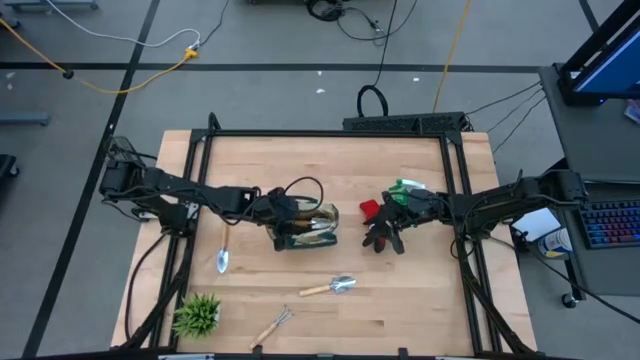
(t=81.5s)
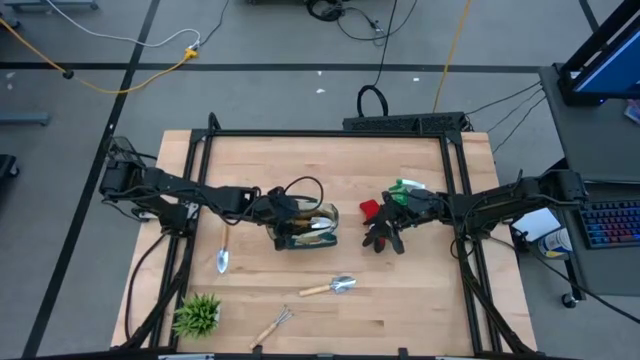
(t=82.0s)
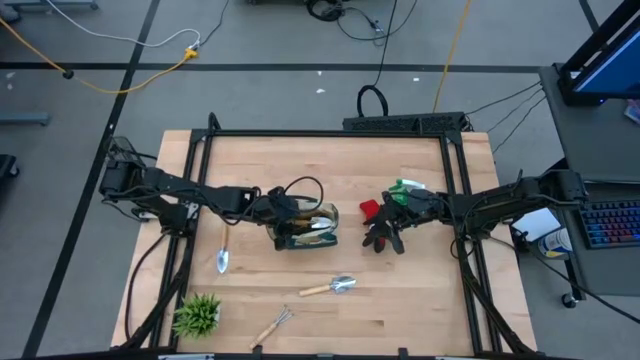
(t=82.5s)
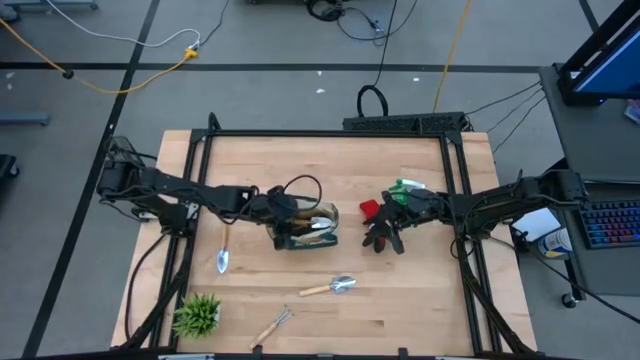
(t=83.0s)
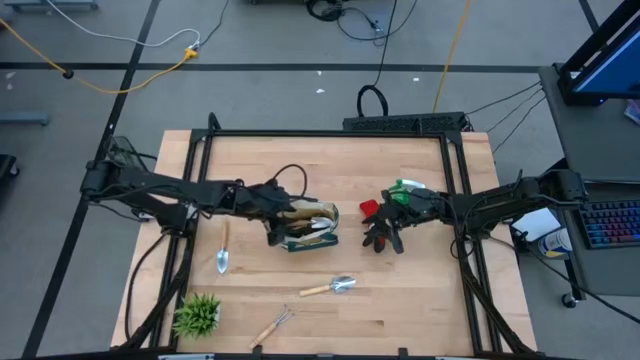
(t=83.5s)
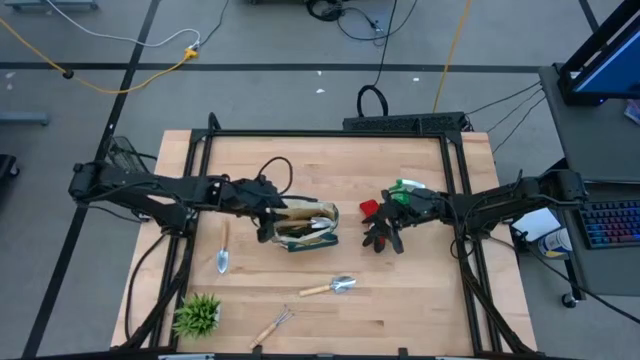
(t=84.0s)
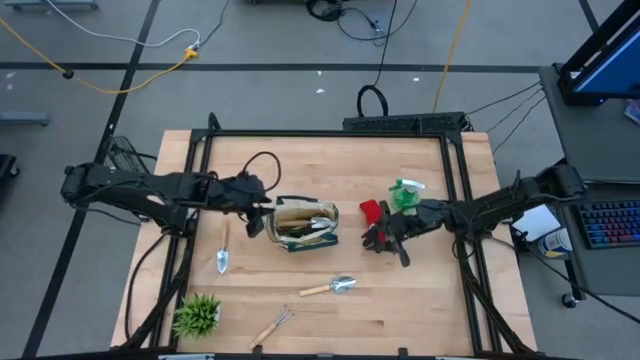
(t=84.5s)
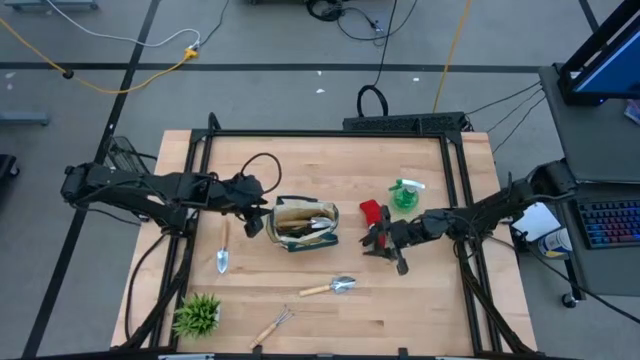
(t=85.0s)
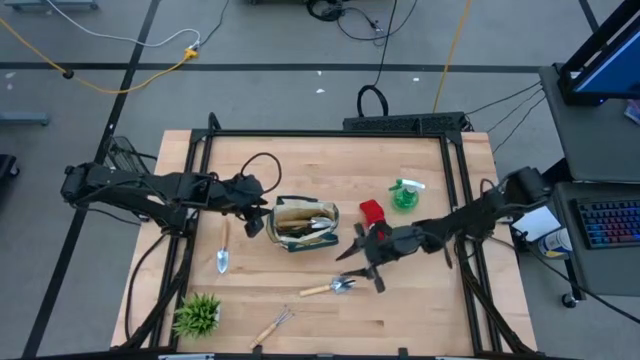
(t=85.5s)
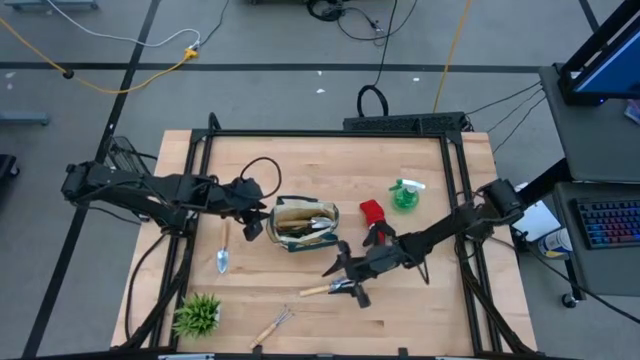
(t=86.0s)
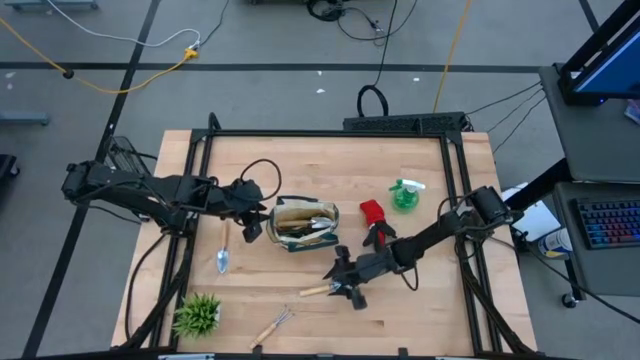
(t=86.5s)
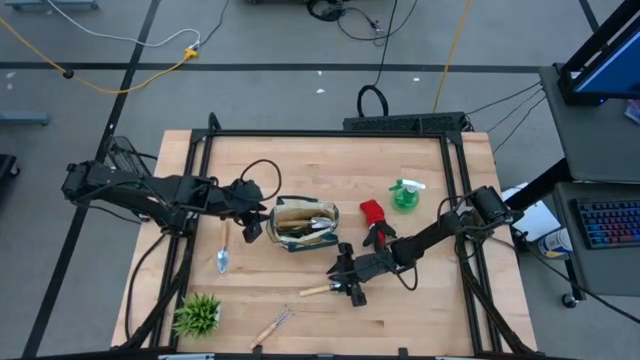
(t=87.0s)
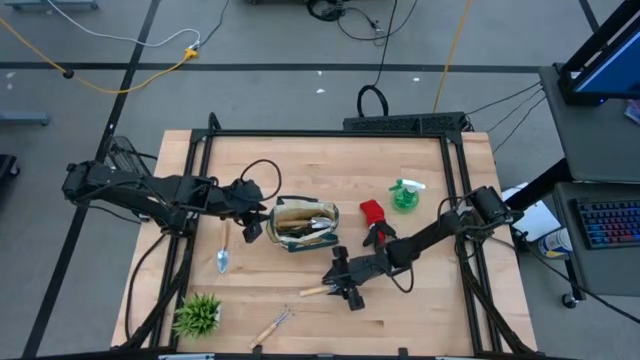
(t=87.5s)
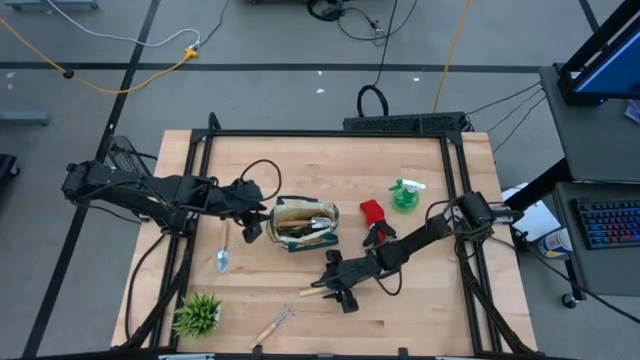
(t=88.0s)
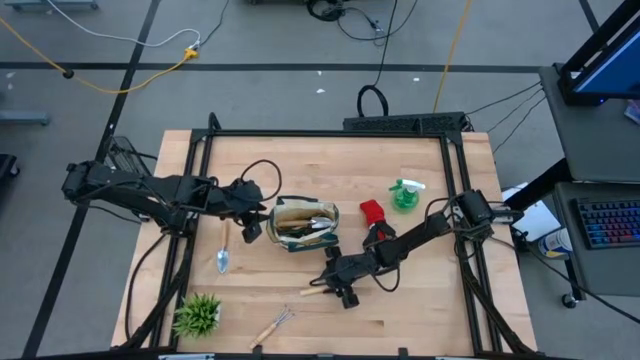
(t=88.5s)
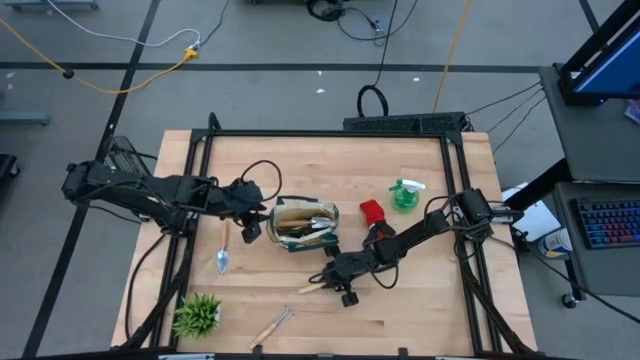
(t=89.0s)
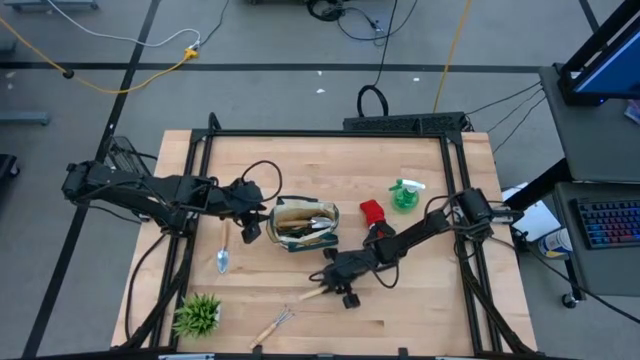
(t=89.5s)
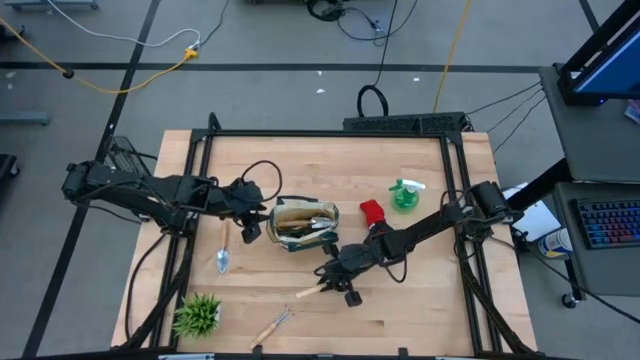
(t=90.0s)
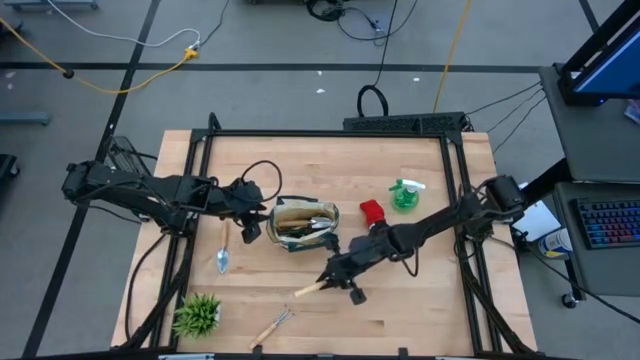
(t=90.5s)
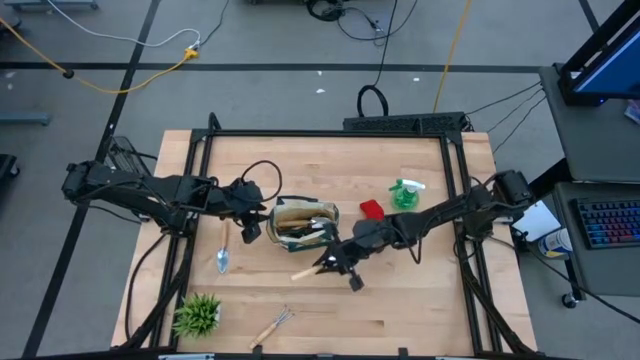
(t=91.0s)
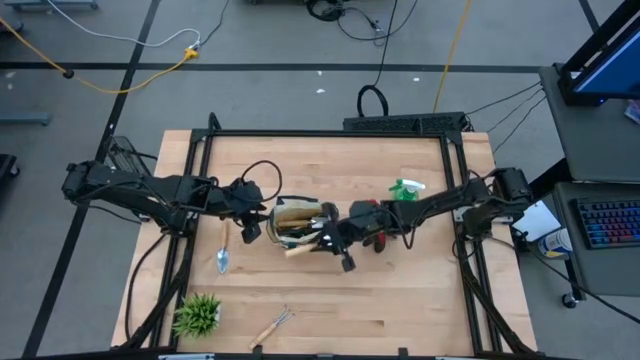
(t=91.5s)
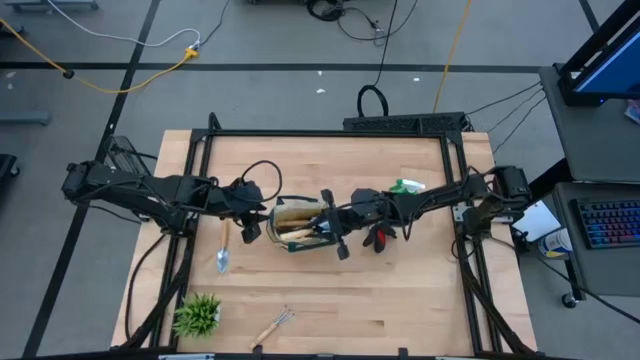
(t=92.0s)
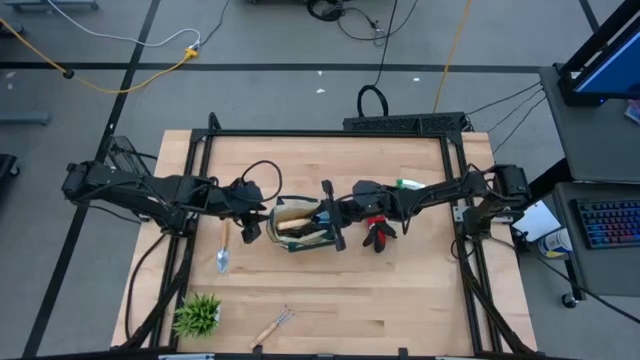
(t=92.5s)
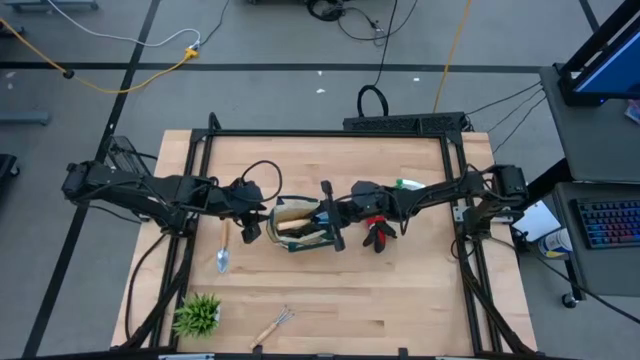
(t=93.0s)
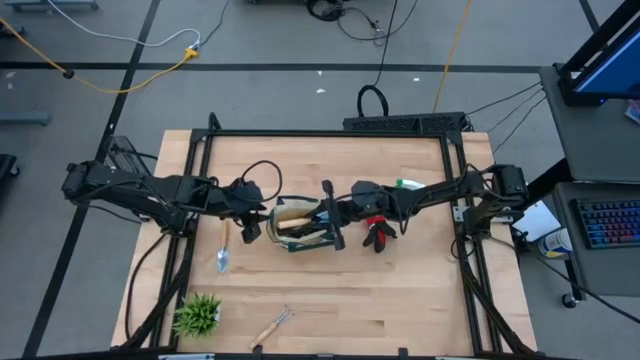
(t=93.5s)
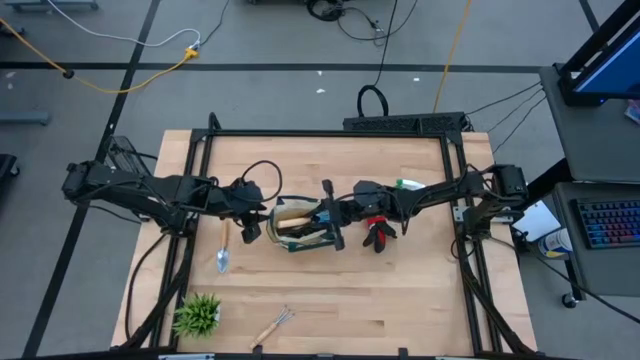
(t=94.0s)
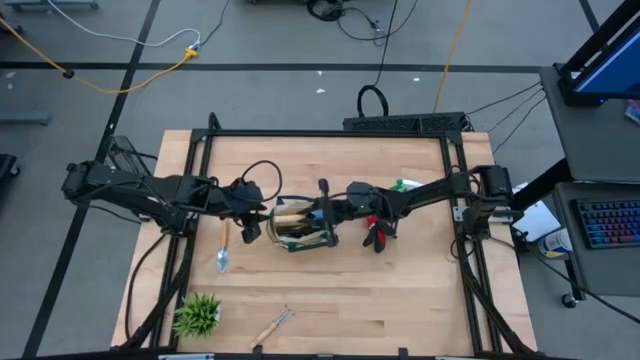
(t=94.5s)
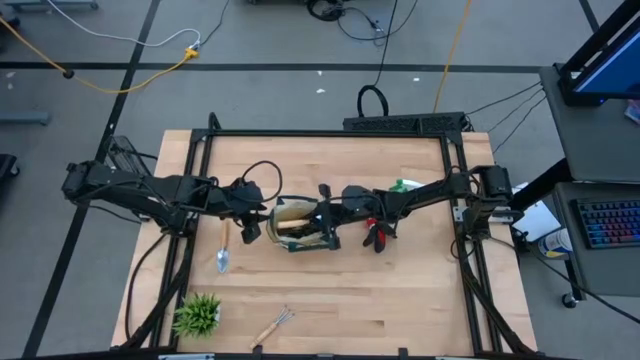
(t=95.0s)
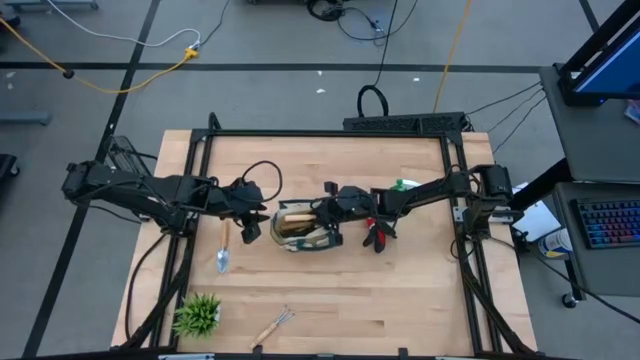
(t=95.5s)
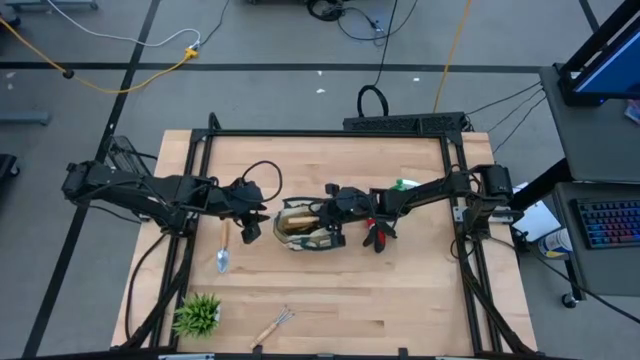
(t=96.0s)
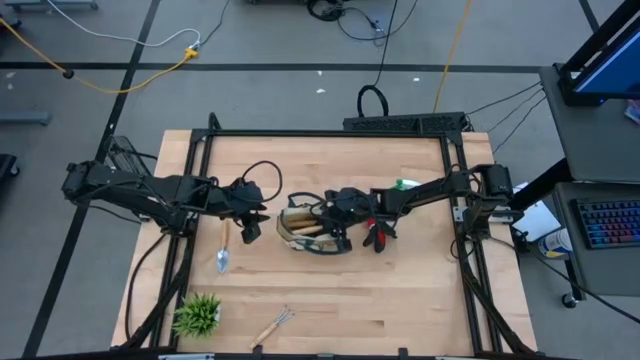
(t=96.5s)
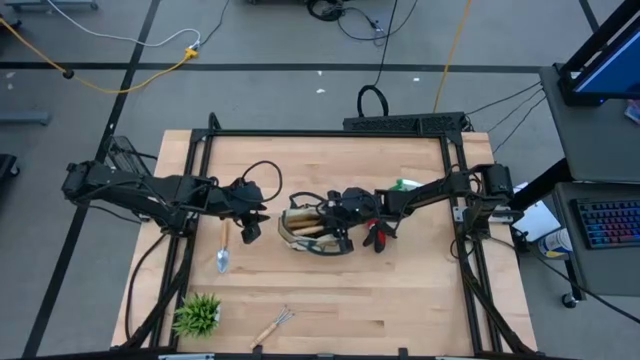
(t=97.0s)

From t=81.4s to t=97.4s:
Task: Pick & Place Garden tools in Gardening bag
Put the right brown trowel into the green gardening bag

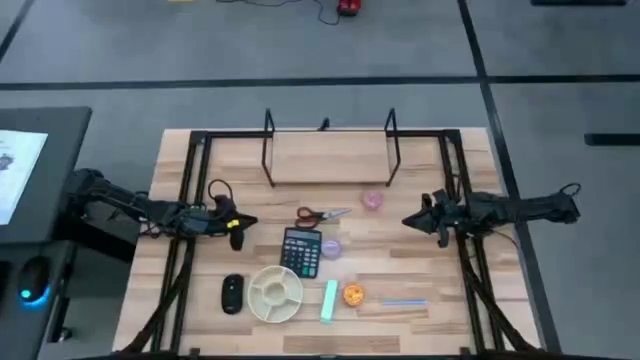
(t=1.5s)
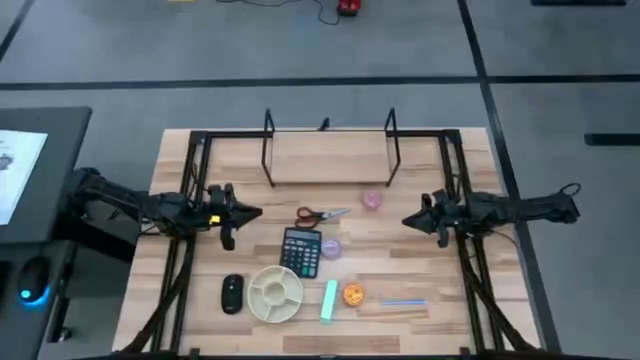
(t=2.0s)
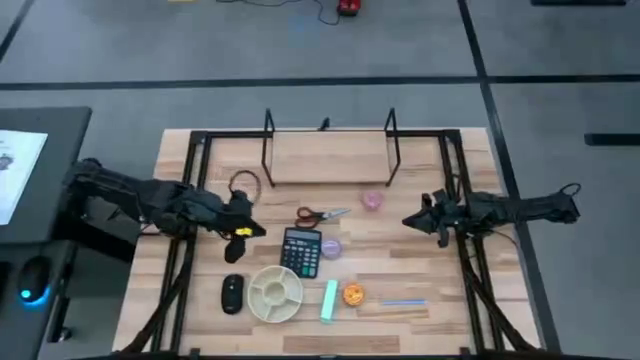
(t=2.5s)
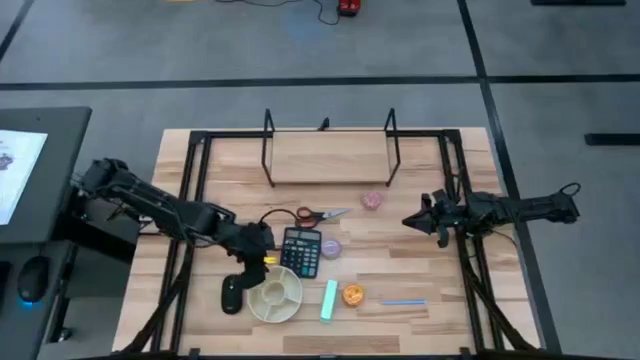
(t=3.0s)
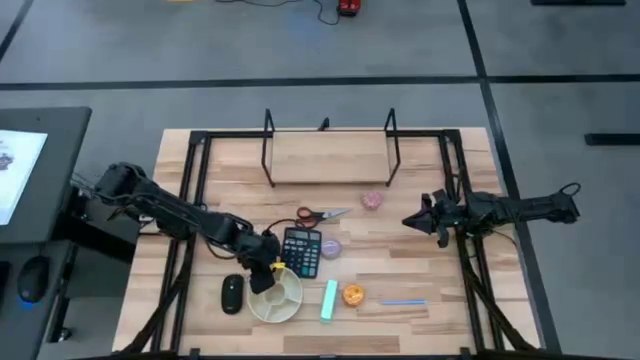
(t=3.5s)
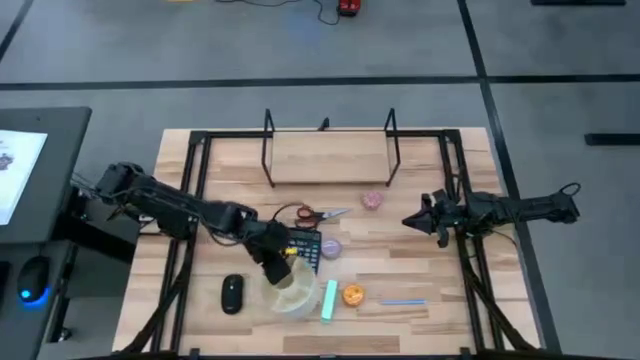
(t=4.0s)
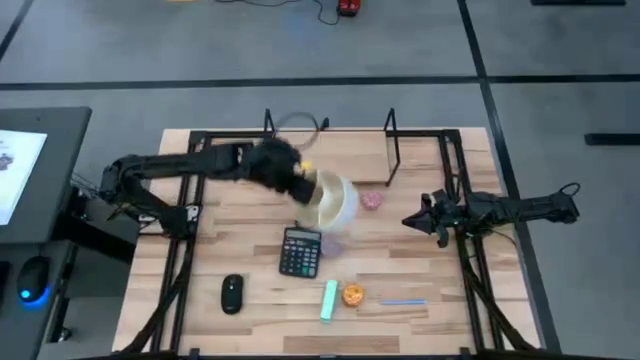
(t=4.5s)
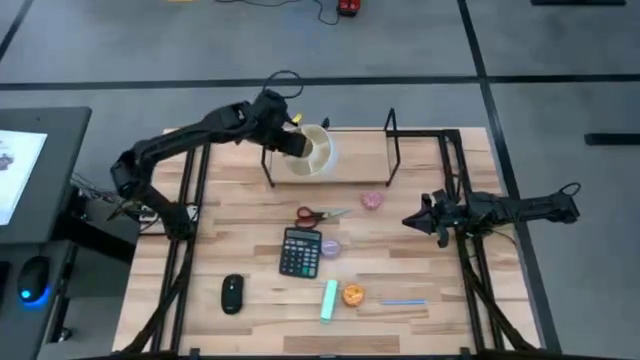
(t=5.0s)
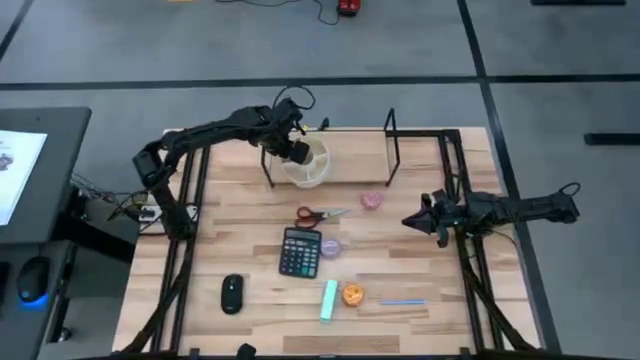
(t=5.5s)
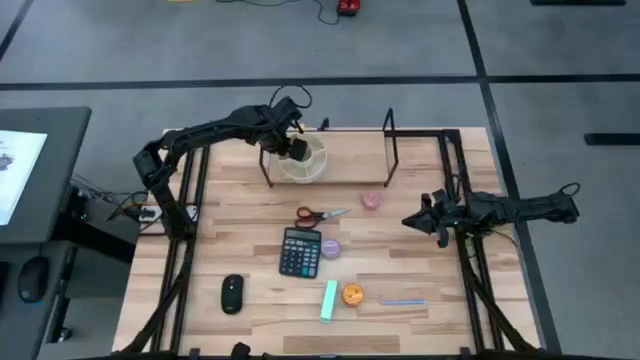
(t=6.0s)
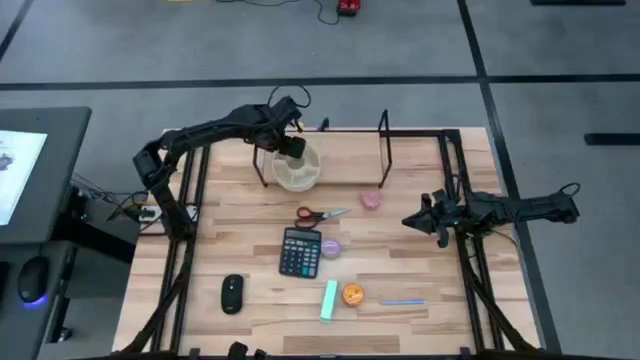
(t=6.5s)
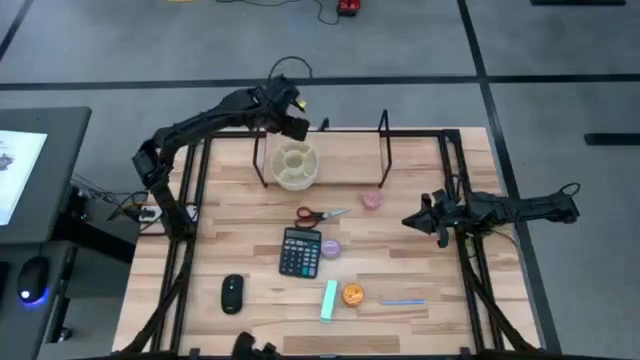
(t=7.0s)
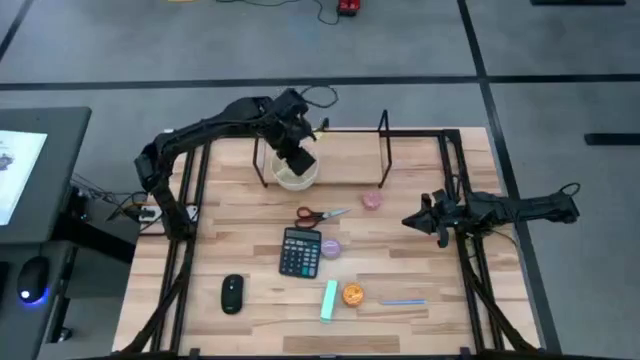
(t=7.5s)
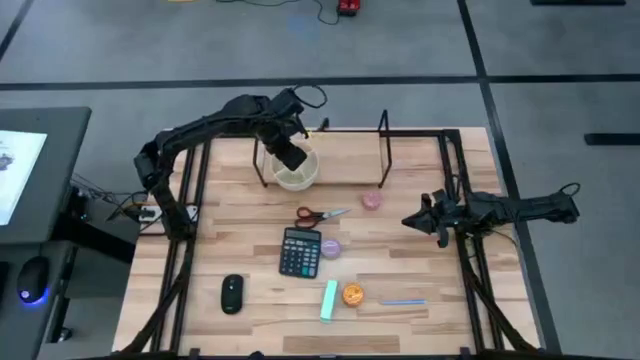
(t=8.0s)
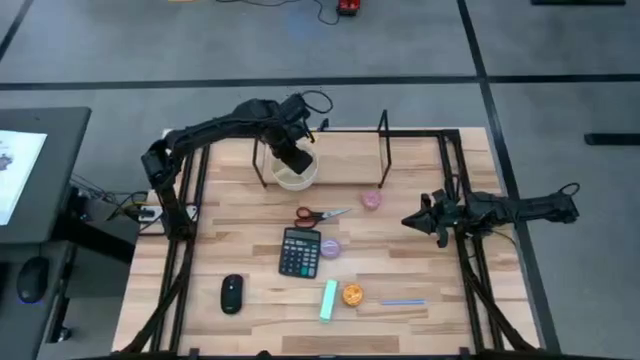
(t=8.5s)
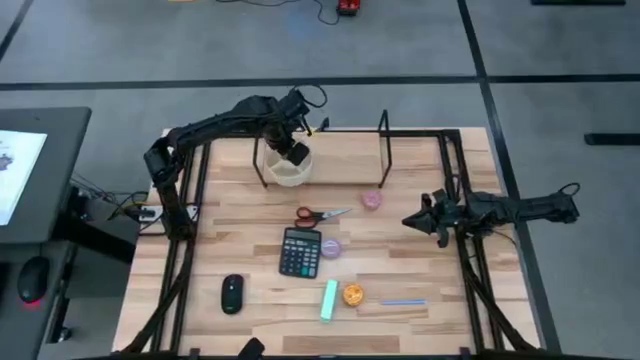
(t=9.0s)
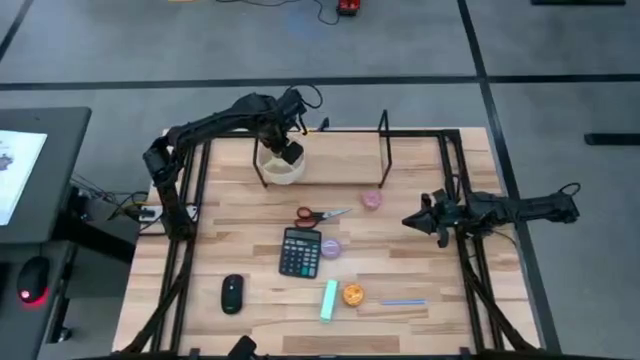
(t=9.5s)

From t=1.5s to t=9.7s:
Task: Stock shelves
Put the white pen organizer on the shelf
